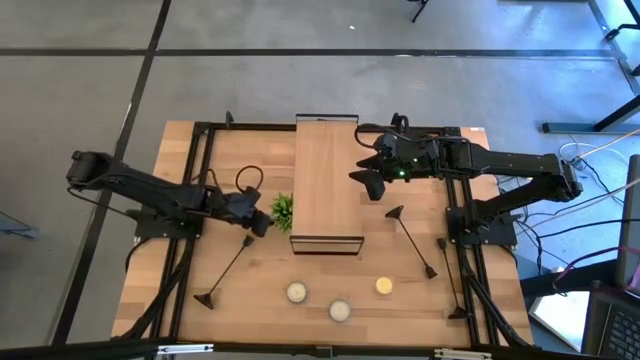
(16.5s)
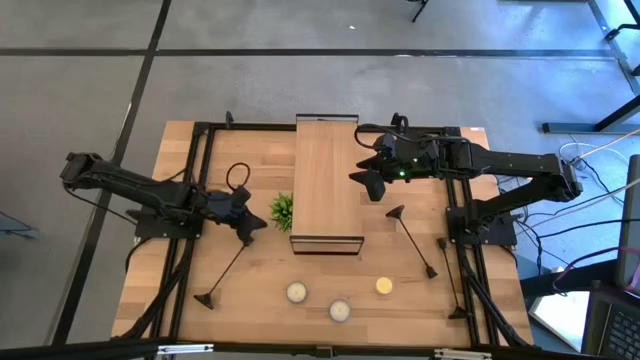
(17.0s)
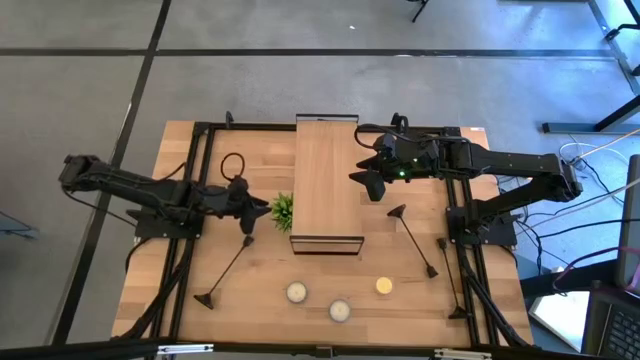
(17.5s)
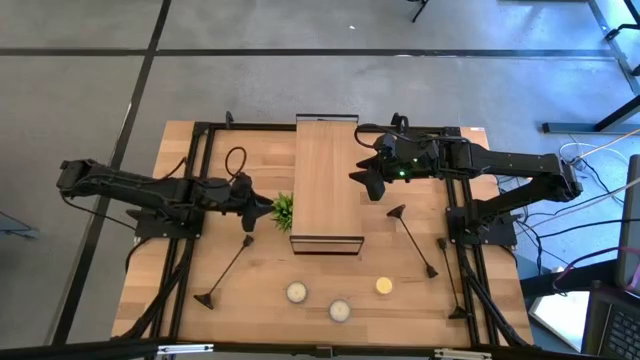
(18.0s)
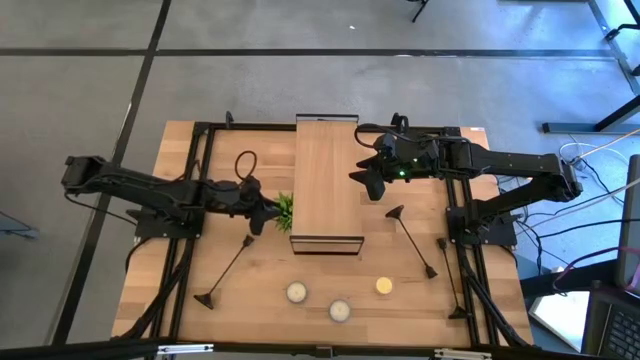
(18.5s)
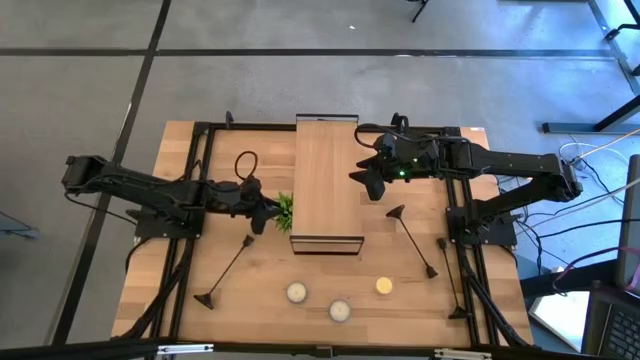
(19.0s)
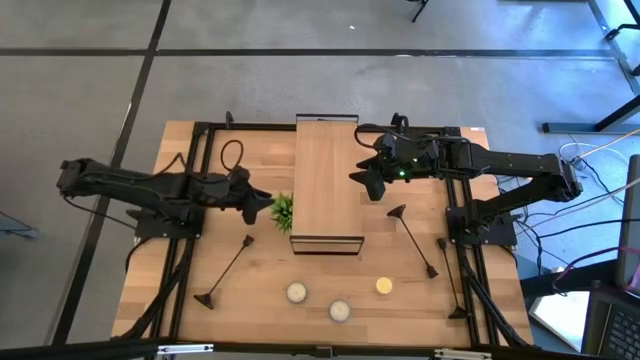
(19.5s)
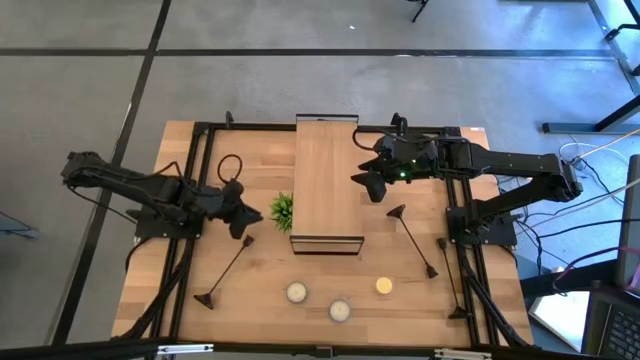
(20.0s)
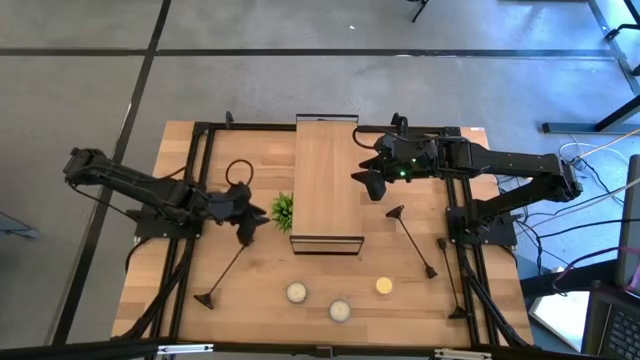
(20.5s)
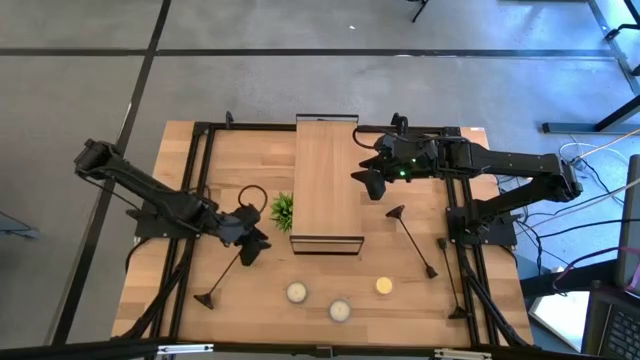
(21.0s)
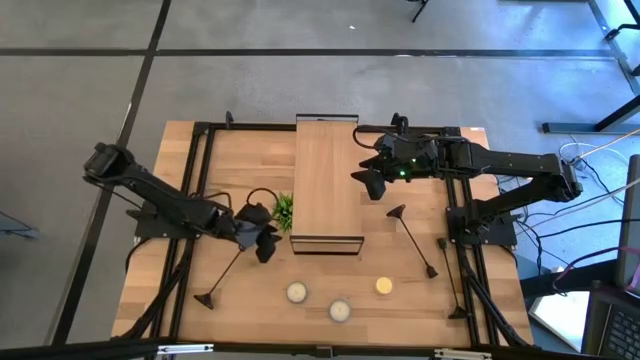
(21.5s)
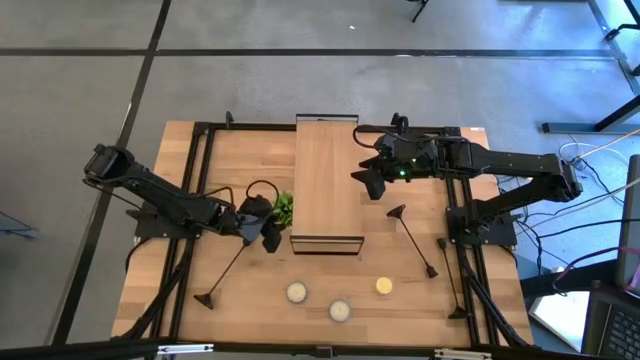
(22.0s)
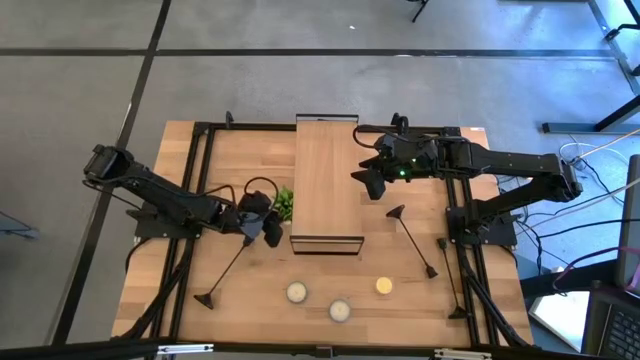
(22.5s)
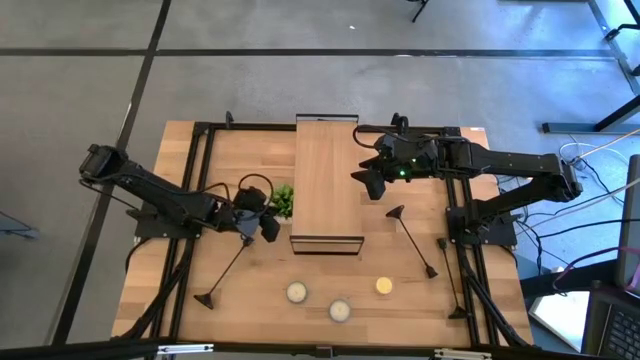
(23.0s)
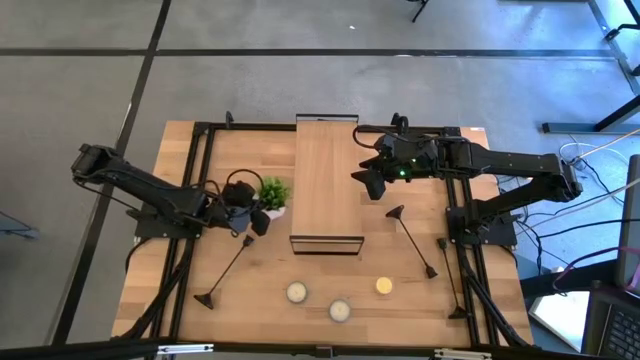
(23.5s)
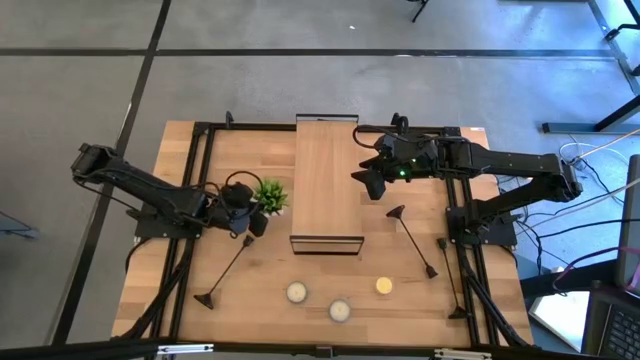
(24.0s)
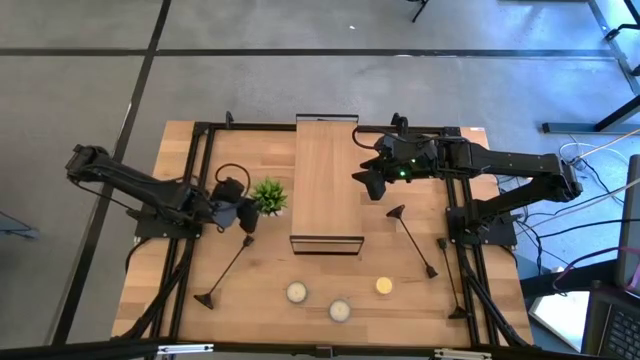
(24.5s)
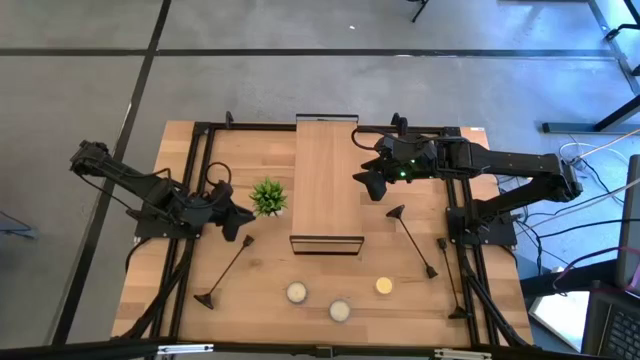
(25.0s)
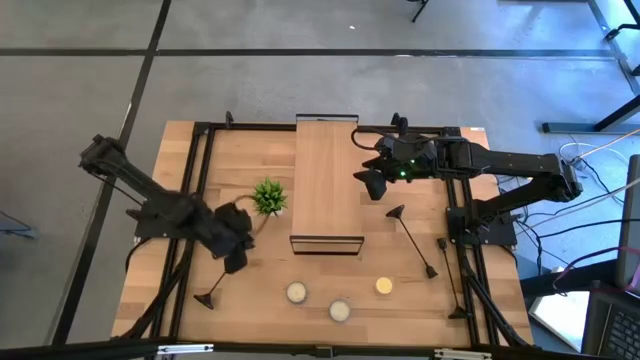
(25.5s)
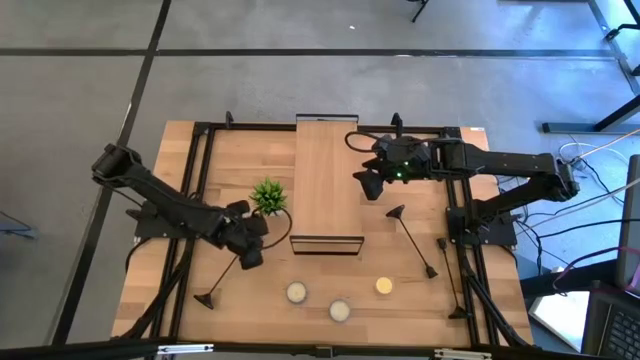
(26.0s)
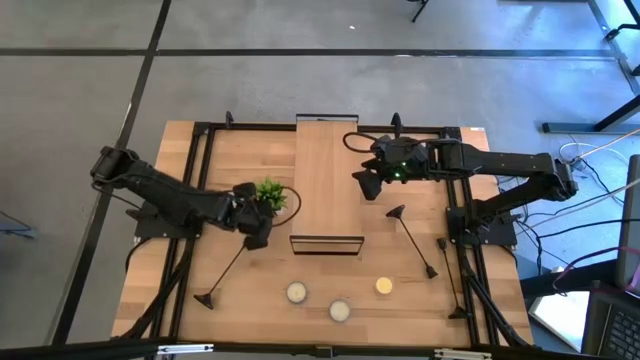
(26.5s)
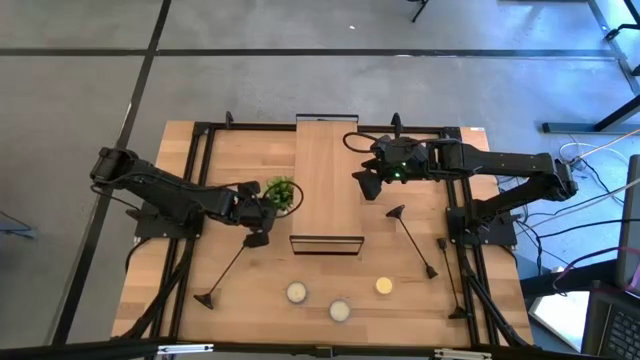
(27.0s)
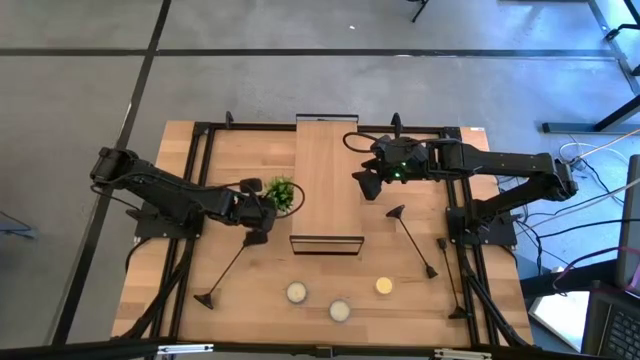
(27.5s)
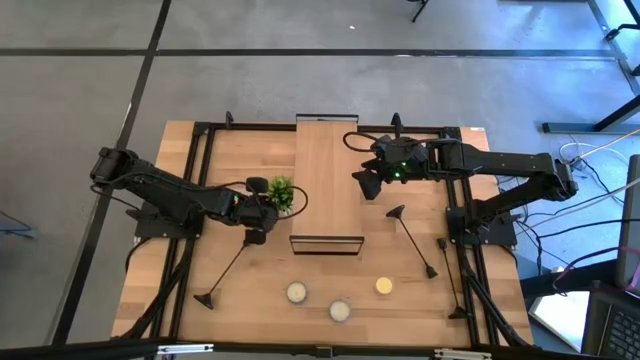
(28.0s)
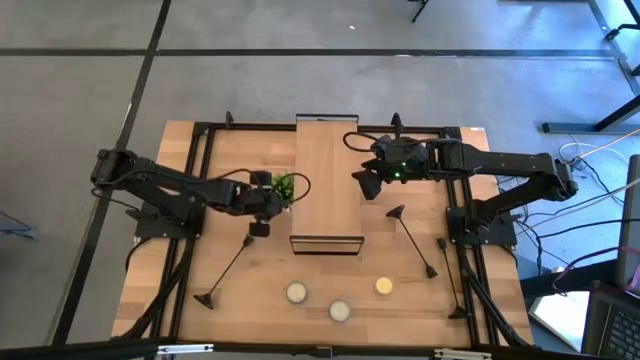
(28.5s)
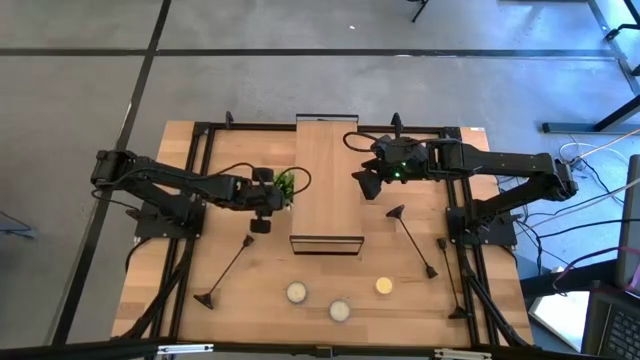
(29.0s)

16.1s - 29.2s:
Task: Pick & Place candle stick holders
Put the flower vase on the shelf

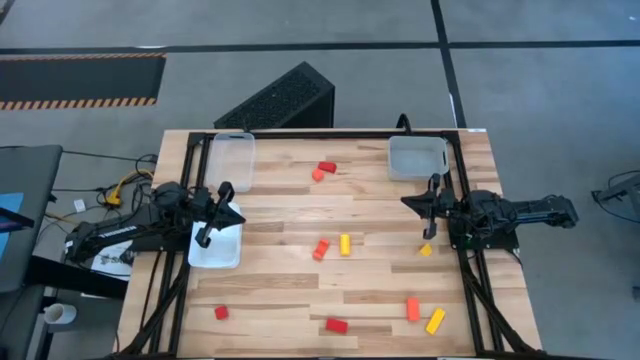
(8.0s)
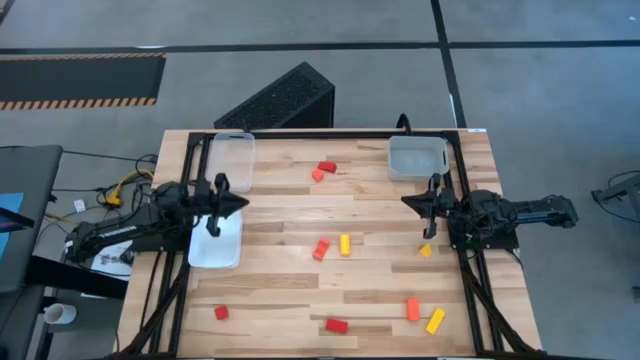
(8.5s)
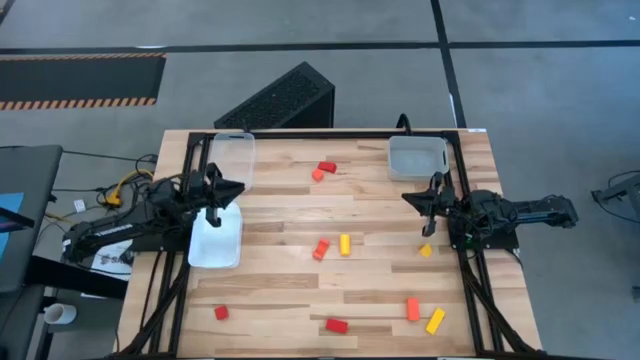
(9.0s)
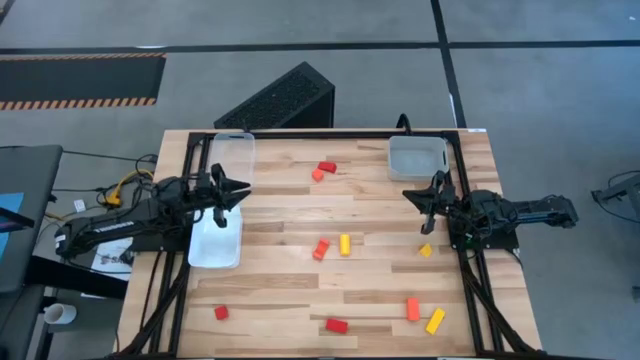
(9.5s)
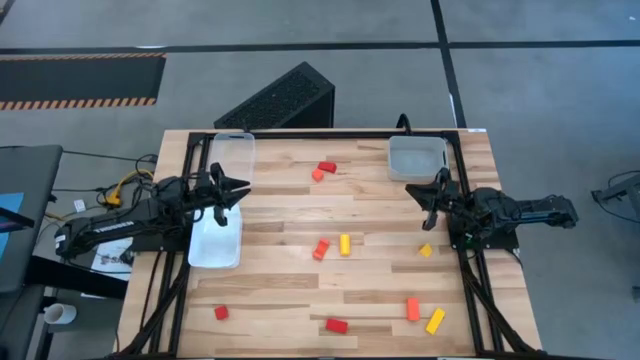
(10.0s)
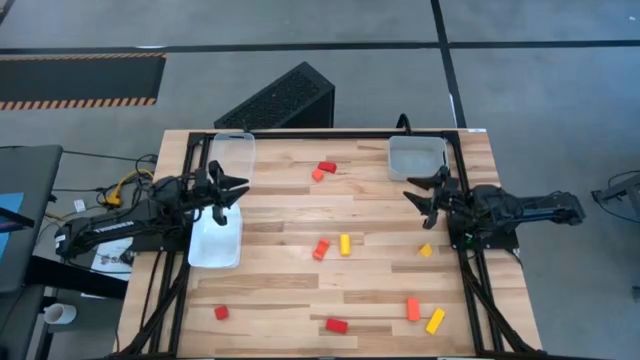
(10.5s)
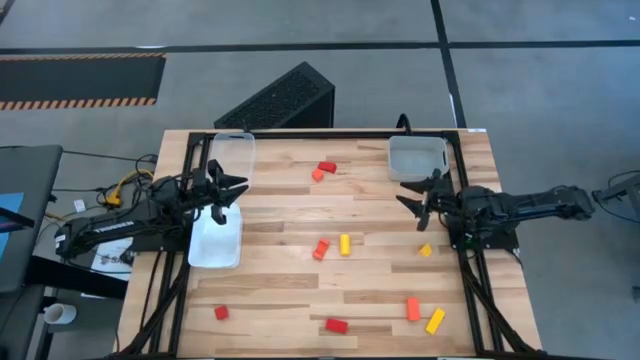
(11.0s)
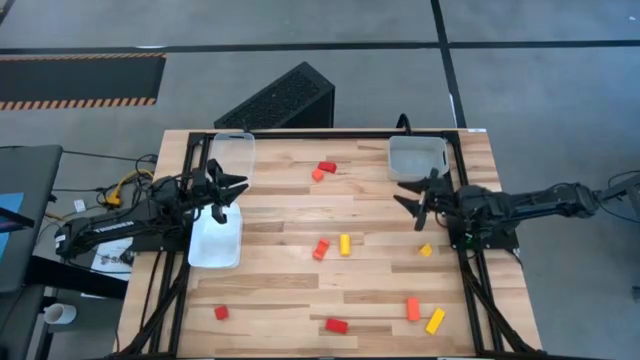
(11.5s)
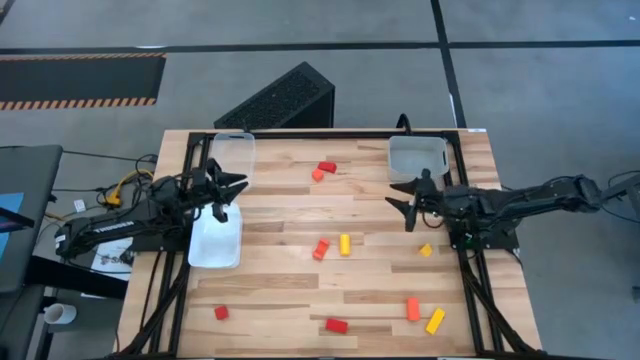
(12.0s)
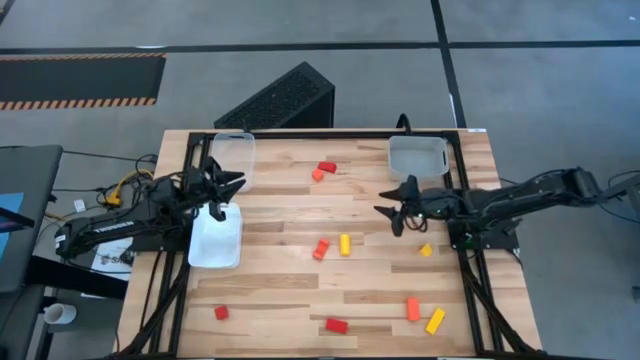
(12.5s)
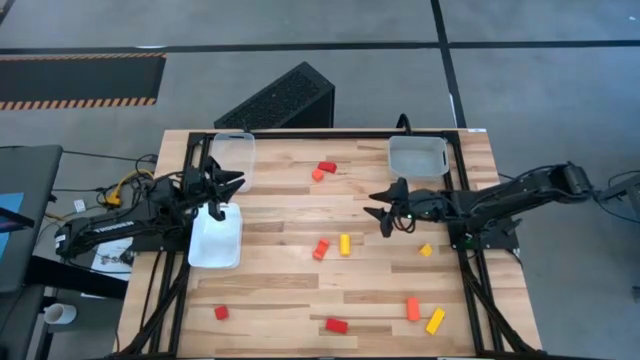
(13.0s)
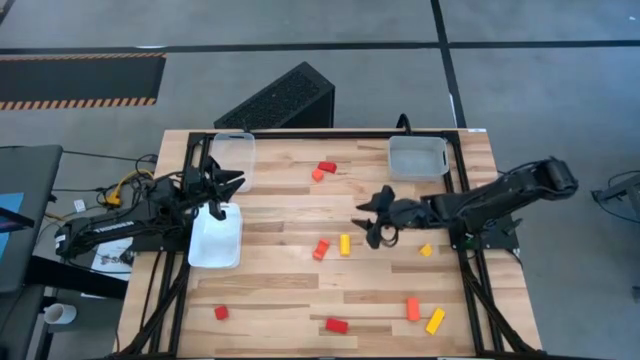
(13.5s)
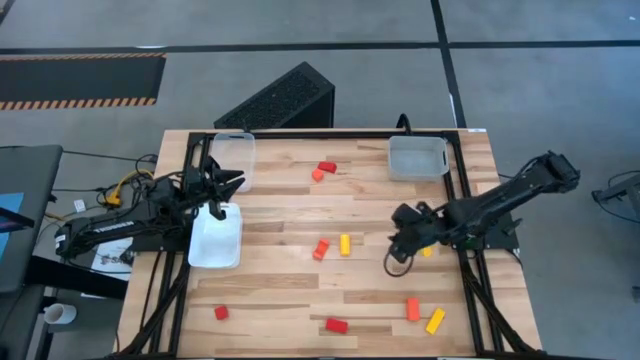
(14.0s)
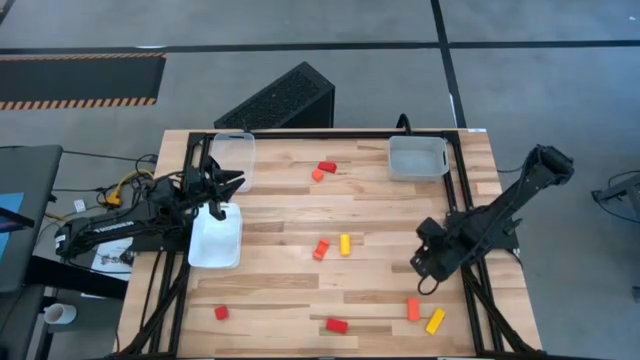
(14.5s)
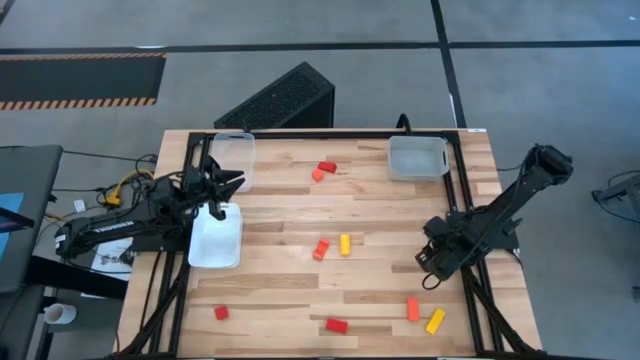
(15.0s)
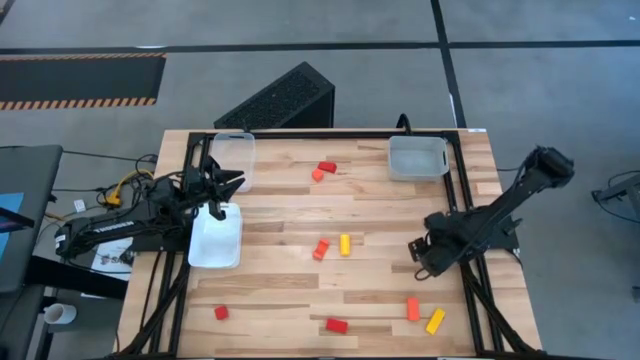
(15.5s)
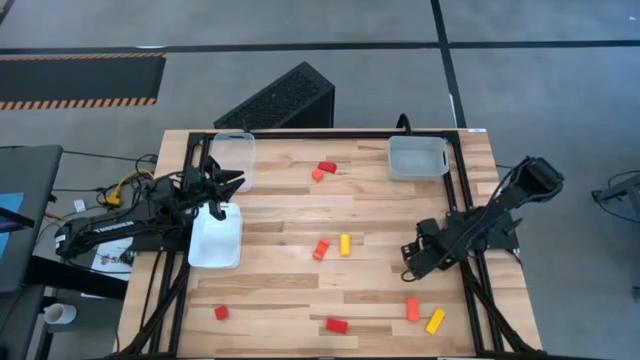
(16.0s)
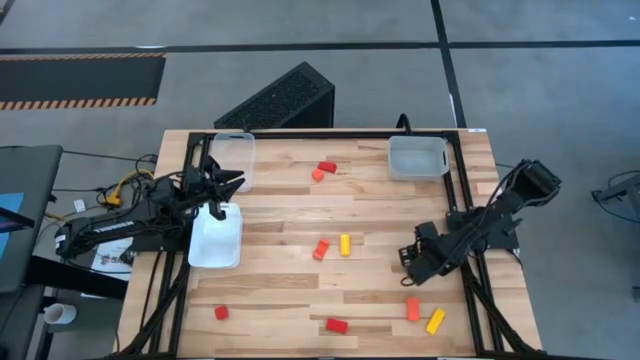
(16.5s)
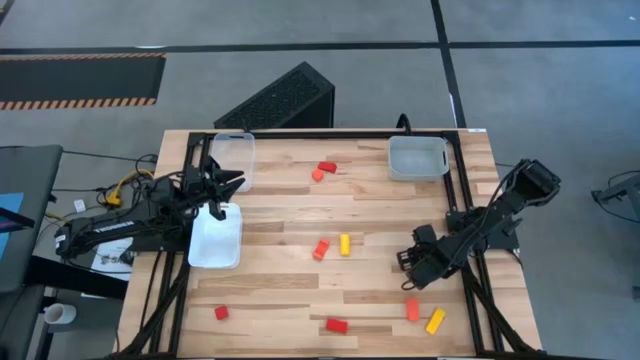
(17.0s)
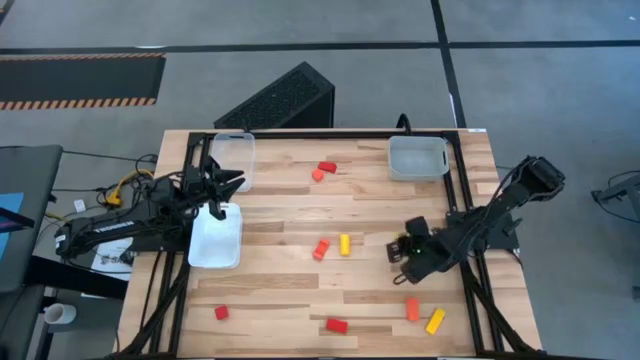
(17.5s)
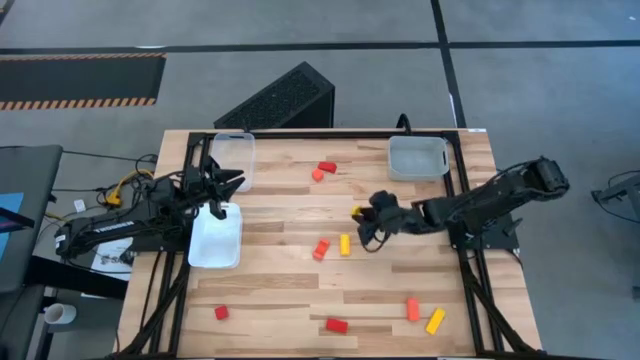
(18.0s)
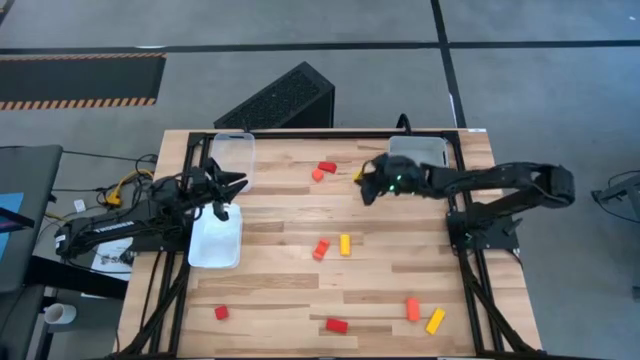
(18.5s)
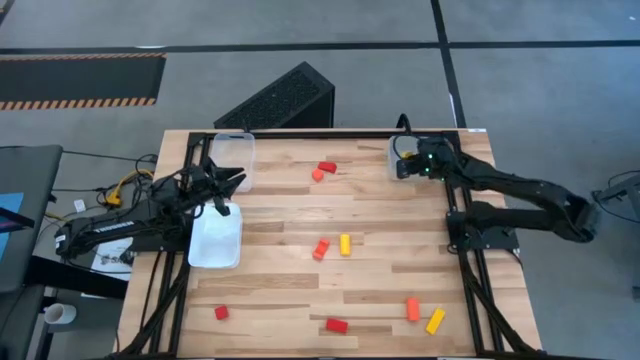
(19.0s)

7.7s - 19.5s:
Task: Sort & place blocks by color
Put the top right yellow block into the gray bin
